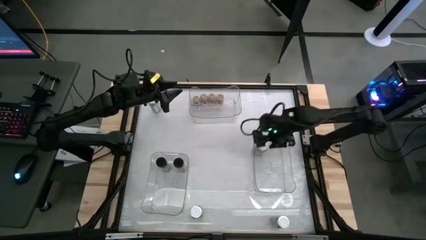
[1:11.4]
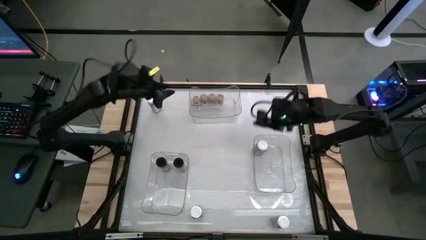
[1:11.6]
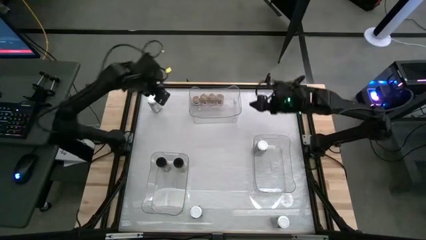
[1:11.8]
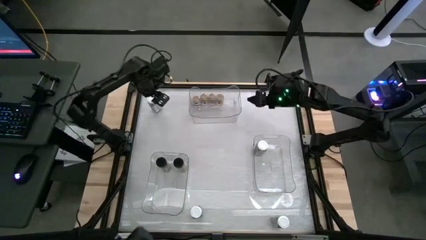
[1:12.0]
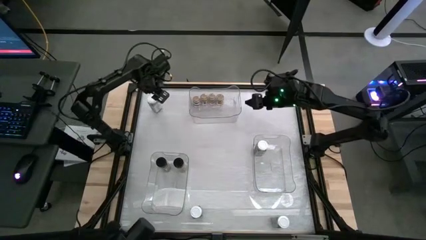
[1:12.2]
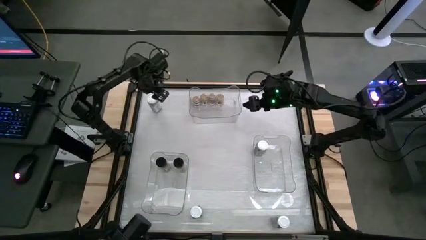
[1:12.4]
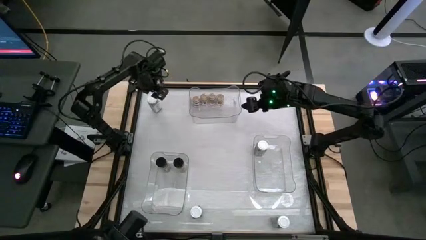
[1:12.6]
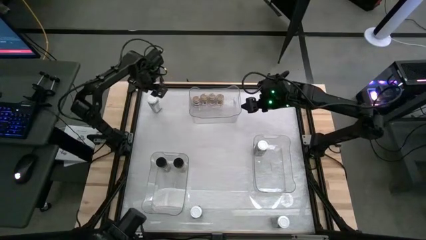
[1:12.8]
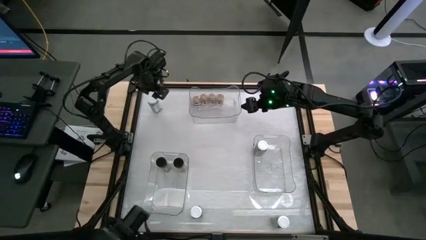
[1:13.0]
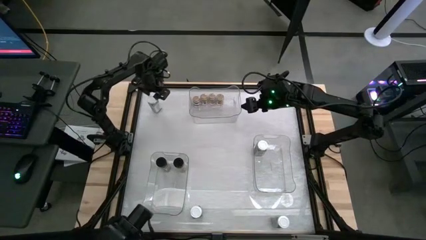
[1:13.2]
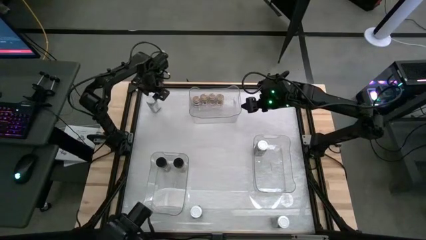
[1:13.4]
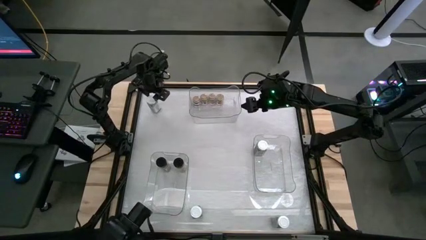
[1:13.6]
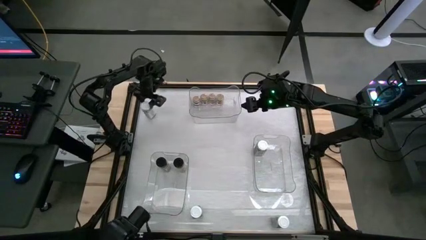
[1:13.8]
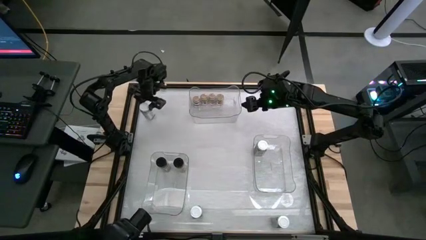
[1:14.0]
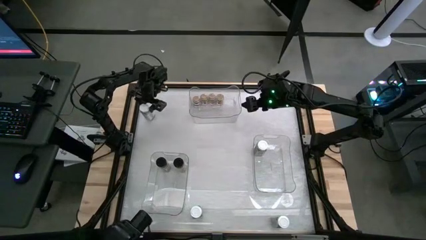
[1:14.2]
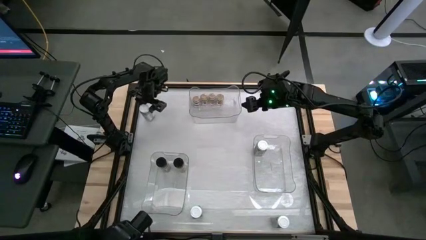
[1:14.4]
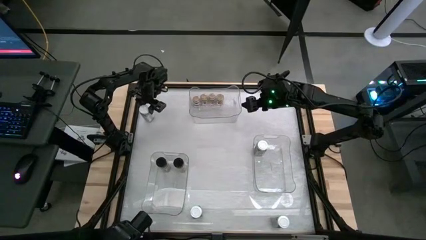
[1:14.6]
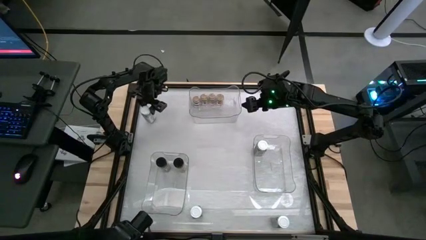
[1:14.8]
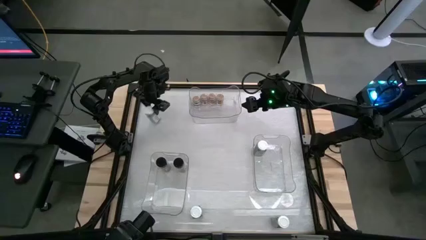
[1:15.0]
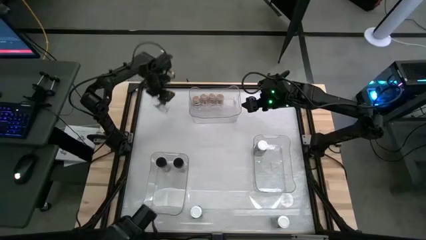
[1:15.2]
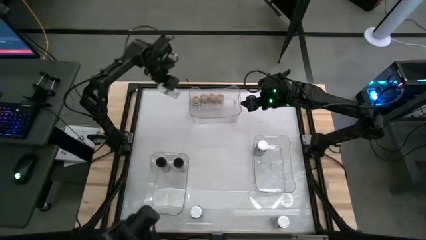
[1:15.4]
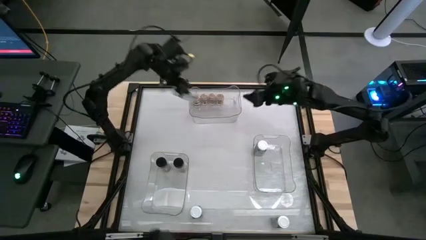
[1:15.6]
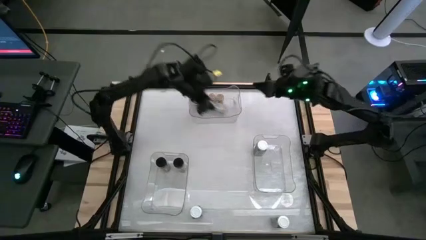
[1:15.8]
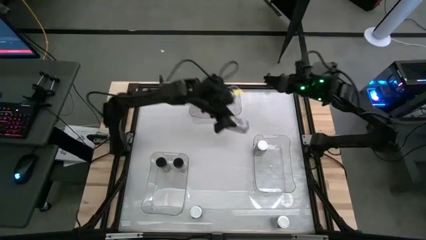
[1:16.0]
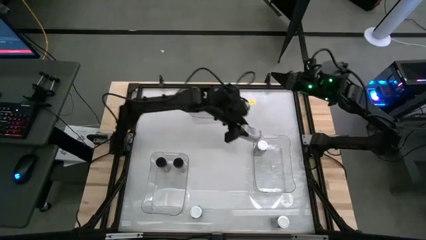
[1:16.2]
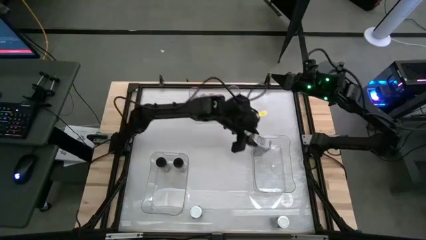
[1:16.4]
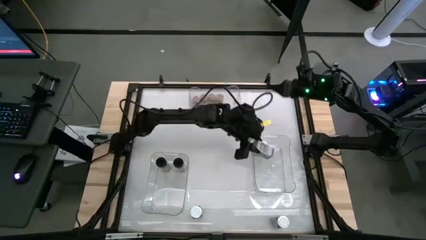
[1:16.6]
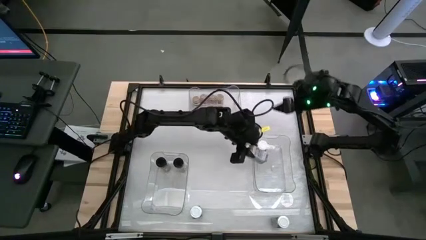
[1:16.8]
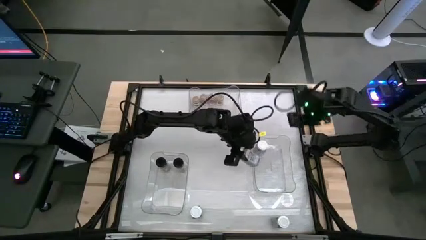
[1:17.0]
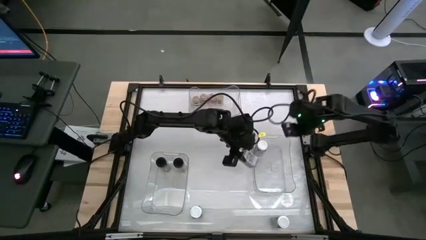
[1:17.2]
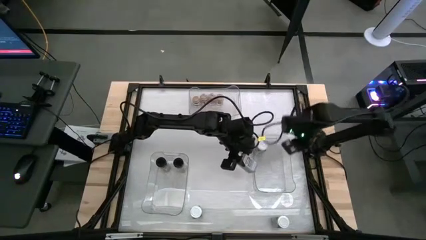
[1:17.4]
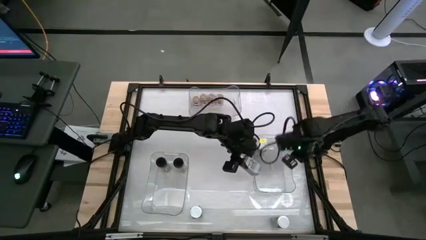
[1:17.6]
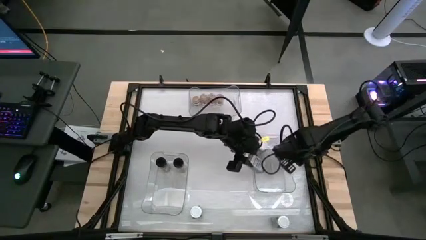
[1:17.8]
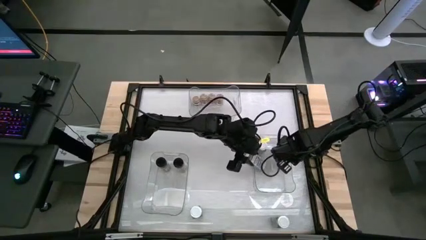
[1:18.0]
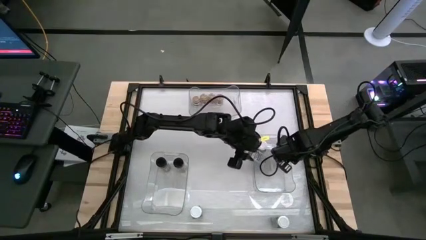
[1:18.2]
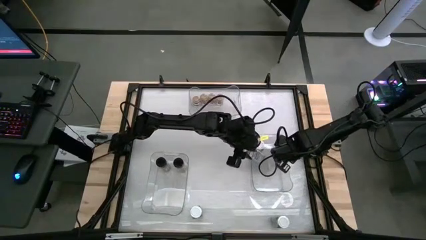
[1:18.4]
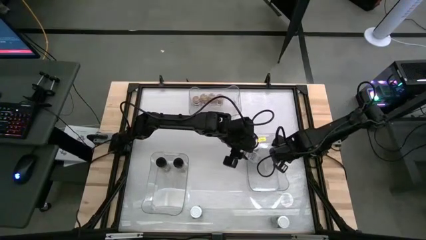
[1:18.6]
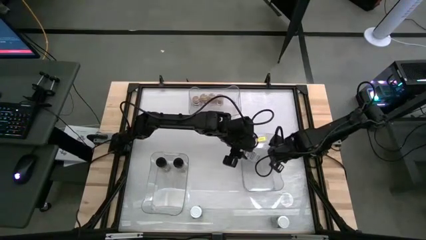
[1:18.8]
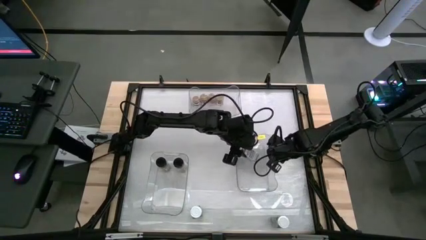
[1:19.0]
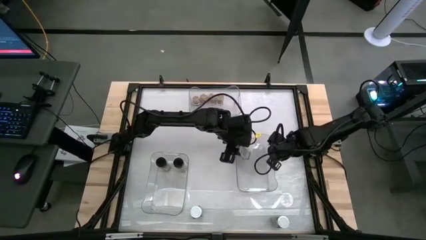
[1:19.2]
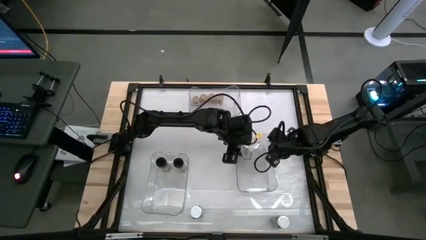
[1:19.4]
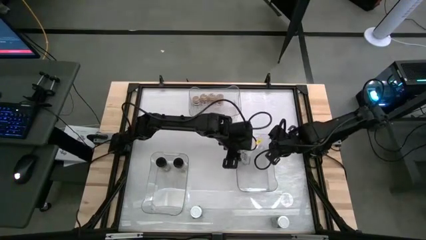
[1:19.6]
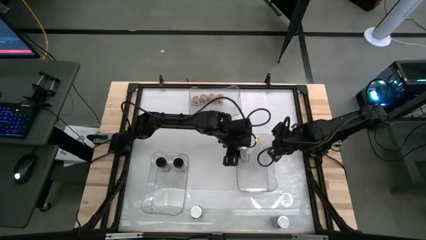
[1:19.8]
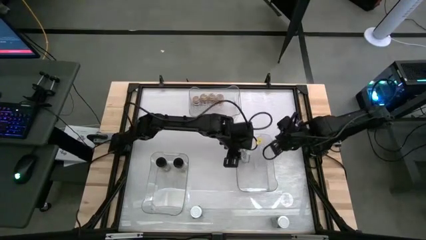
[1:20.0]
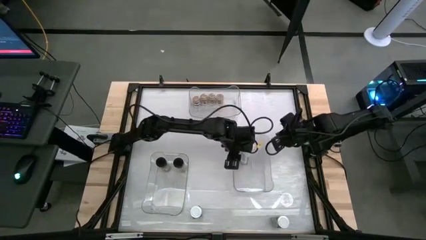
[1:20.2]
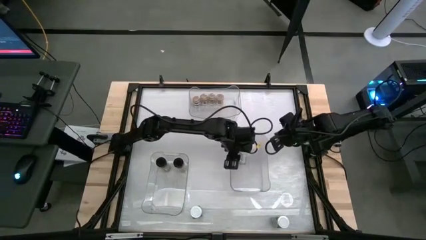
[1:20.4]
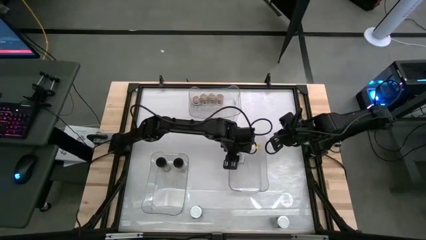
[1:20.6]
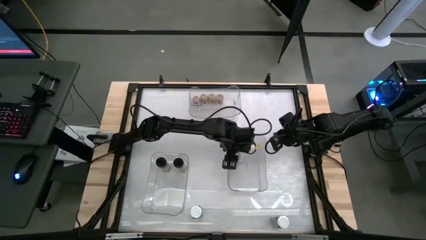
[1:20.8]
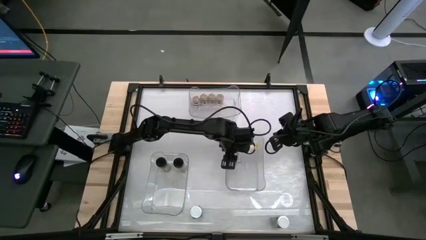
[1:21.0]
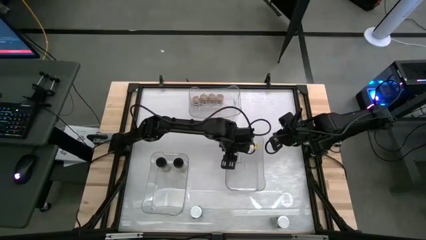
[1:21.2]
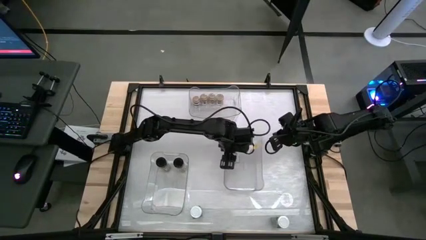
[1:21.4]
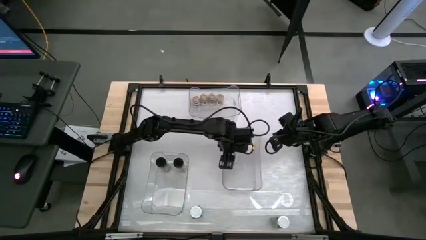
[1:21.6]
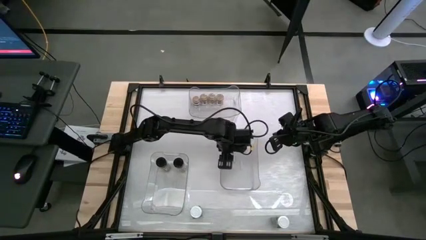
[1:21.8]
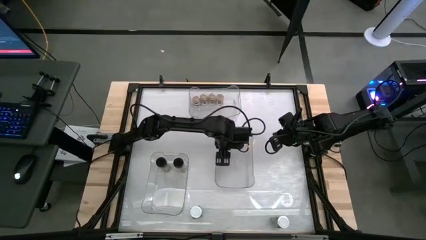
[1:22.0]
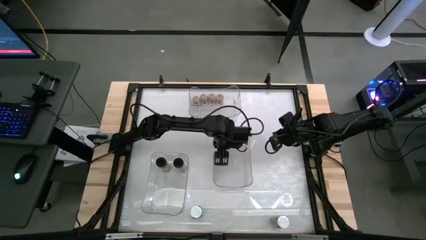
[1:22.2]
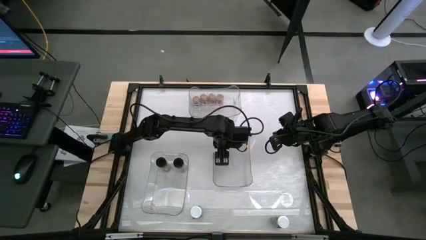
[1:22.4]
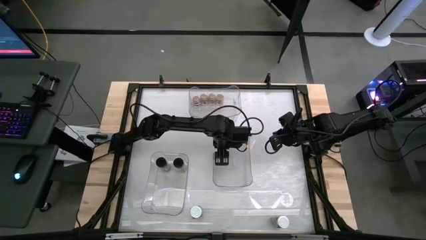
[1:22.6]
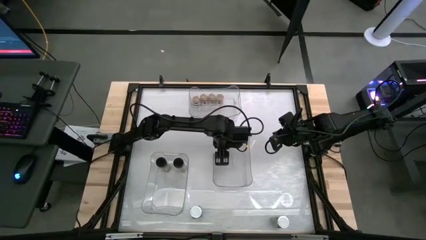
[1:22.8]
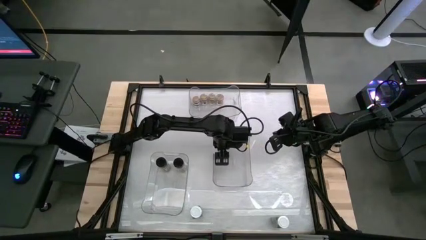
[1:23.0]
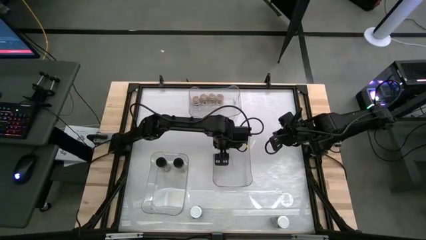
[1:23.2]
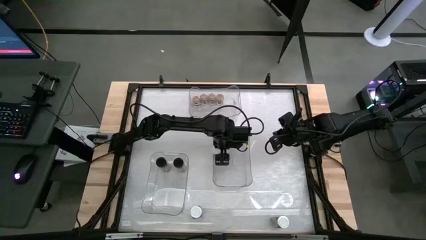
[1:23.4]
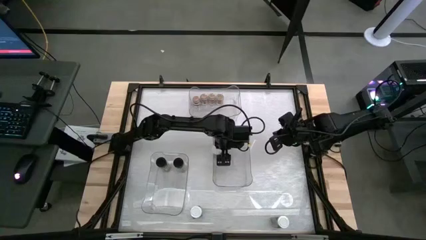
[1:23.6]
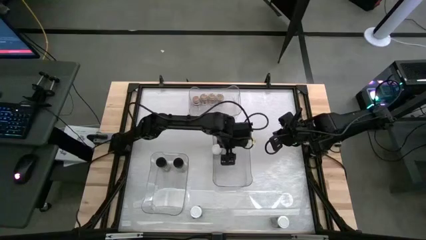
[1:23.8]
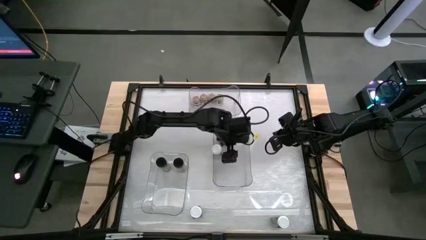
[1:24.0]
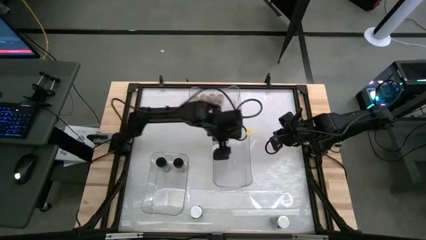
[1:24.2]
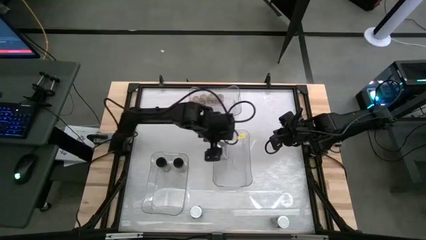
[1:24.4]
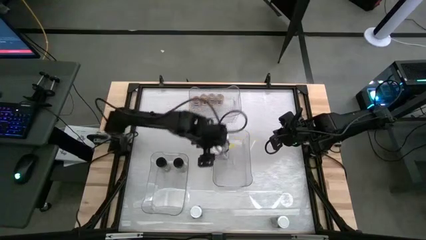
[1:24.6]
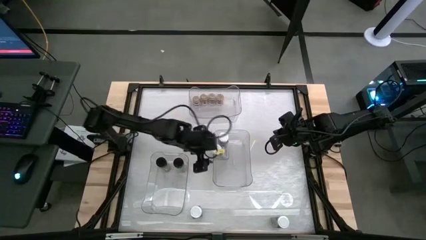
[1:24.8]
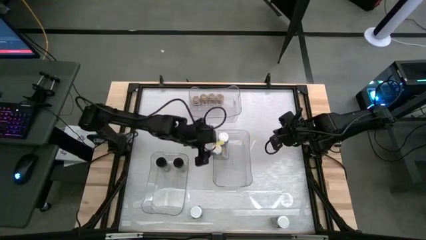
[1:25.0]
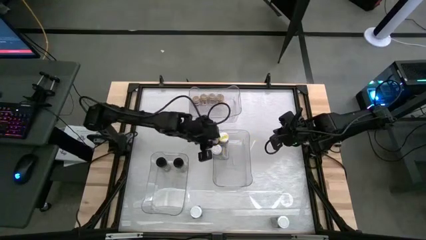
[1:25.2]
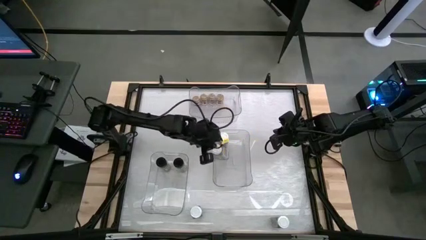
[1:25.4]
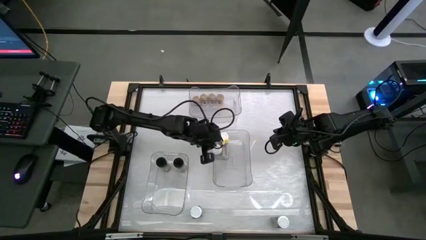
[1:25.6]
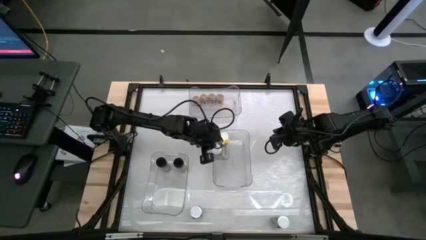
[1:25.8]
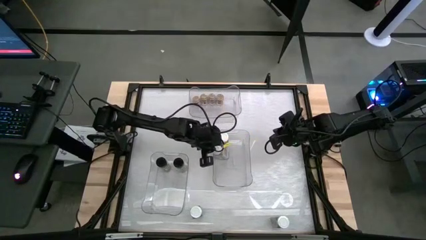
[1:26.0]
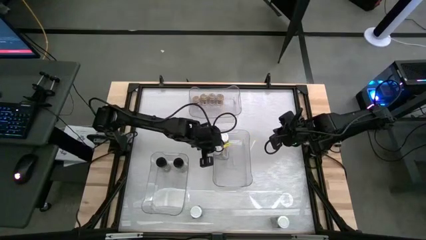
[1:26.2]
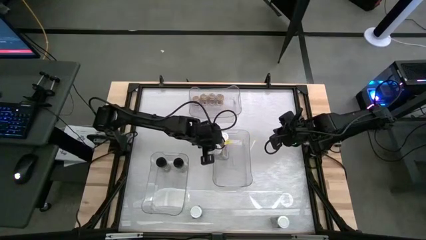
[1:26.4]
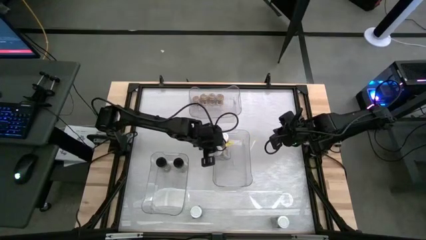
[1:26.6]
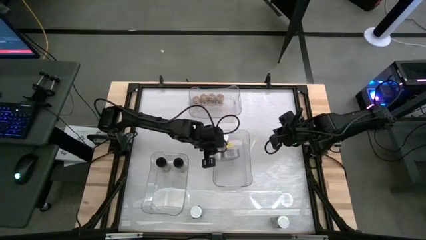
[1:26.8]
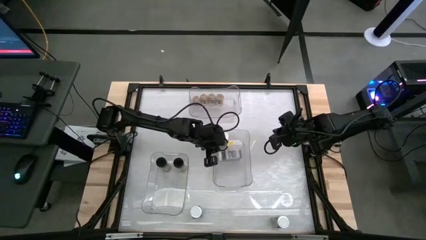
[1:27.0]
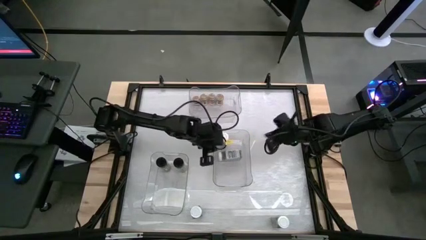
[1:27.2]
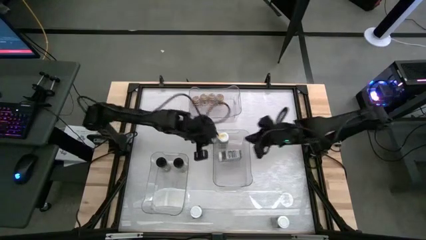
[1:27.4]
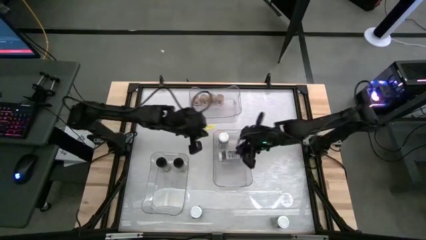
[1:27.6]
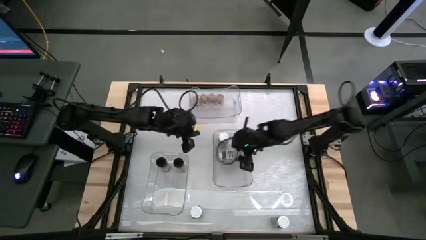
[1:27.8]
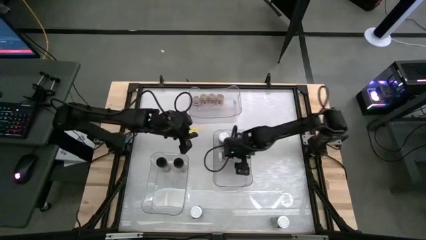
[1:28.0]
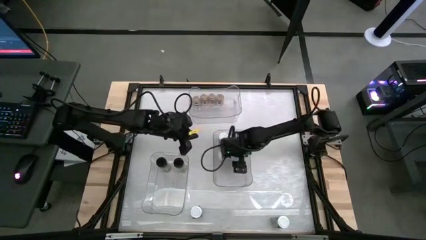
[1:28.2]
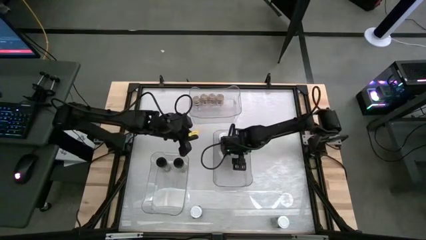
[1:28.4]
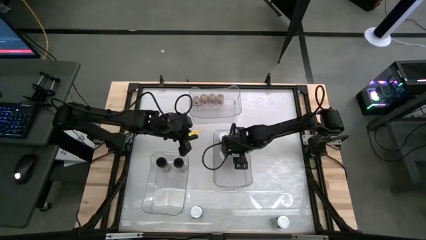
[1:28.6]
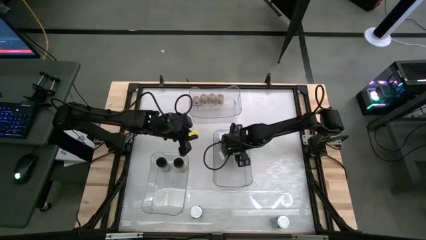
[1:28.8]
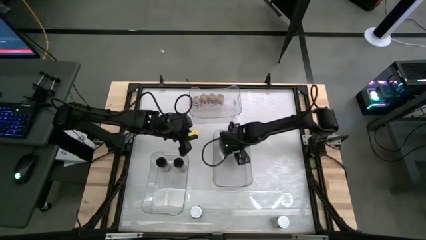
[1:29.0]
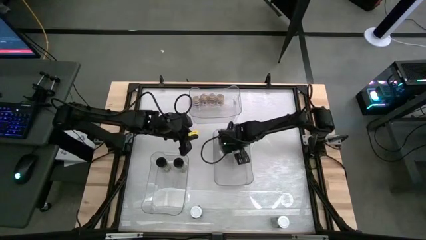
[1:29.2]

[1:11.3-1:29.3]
Task: Sort spices by type
Put the white seasoning bottle into the bottom right transparent bin
